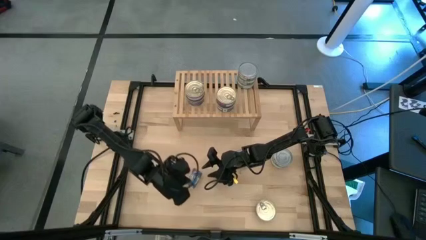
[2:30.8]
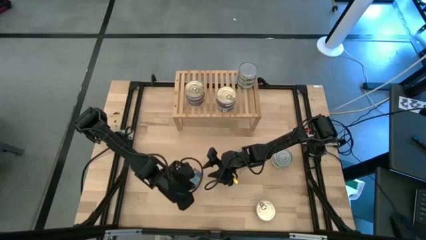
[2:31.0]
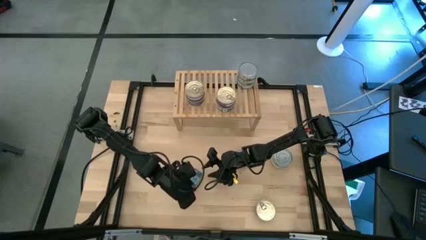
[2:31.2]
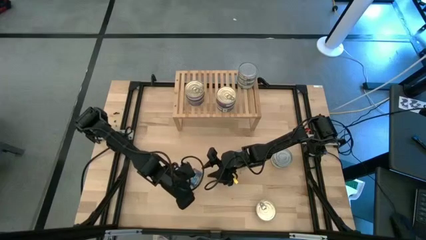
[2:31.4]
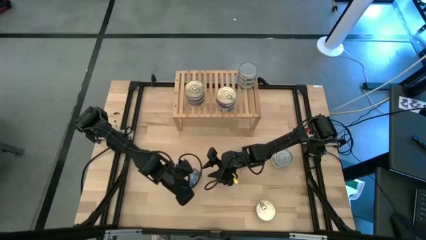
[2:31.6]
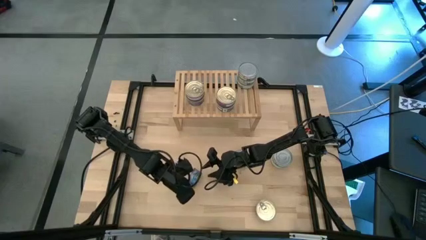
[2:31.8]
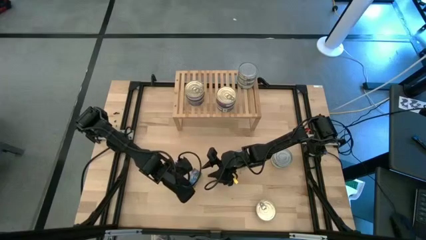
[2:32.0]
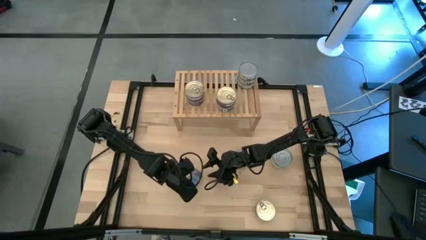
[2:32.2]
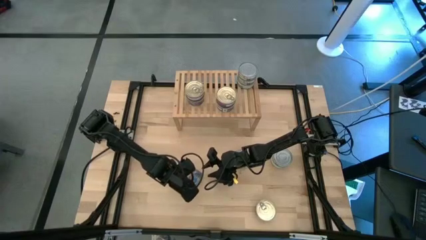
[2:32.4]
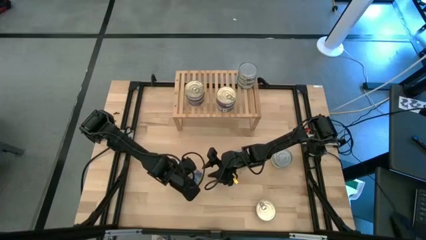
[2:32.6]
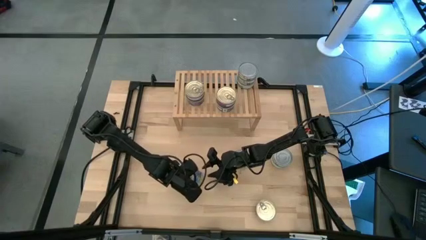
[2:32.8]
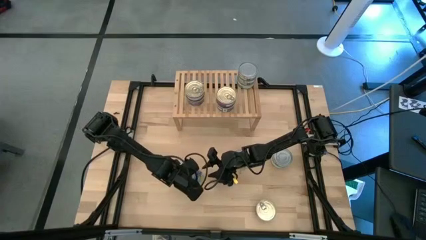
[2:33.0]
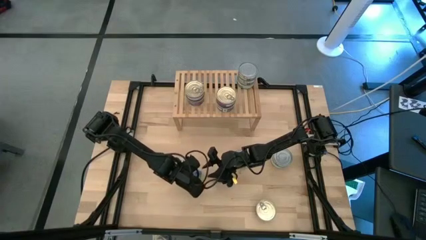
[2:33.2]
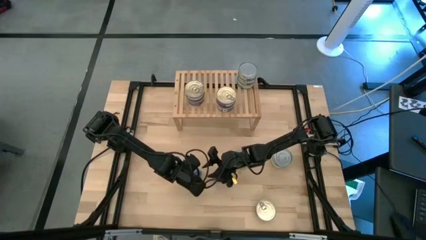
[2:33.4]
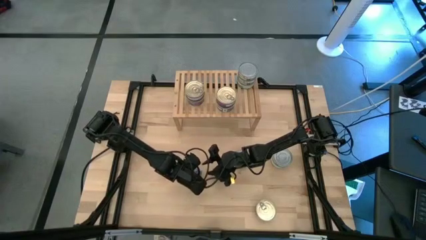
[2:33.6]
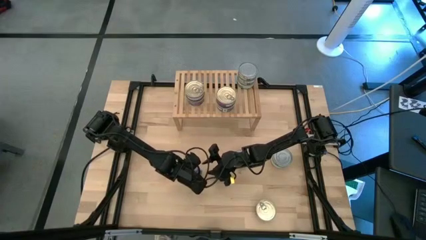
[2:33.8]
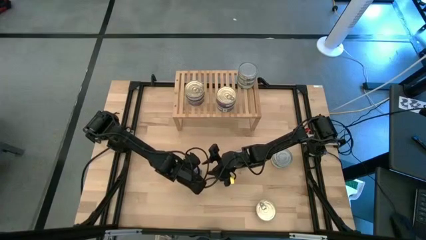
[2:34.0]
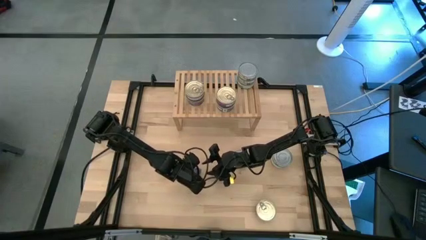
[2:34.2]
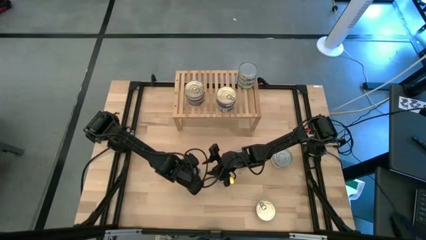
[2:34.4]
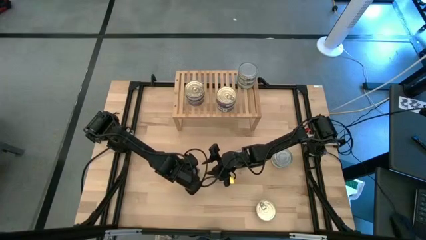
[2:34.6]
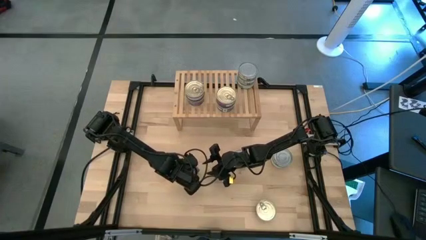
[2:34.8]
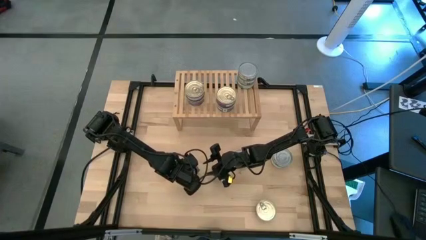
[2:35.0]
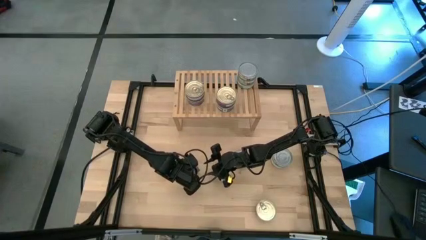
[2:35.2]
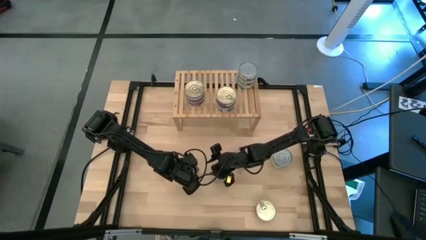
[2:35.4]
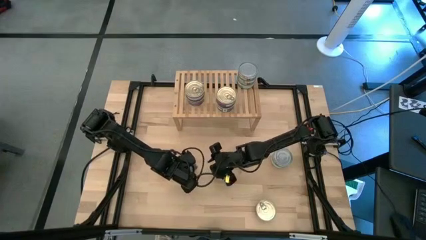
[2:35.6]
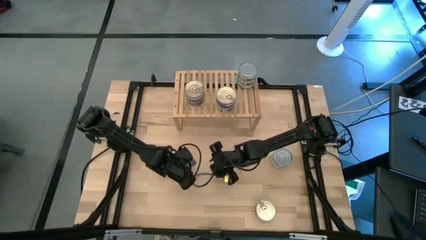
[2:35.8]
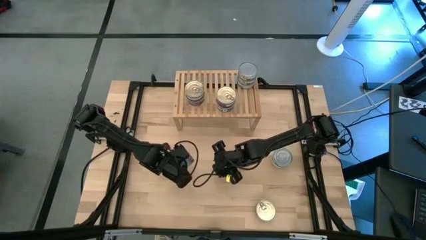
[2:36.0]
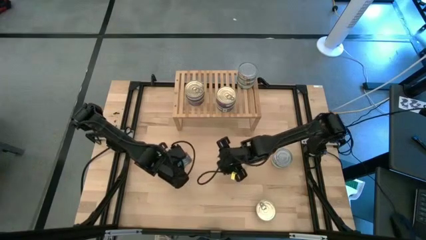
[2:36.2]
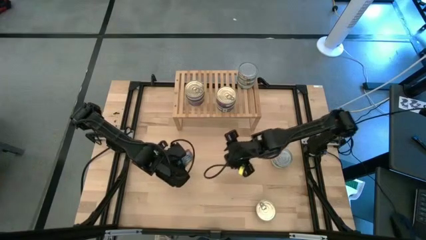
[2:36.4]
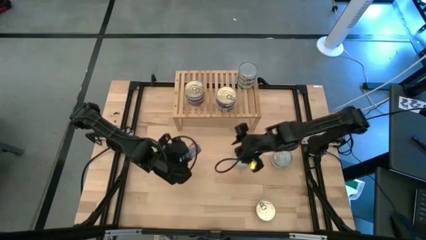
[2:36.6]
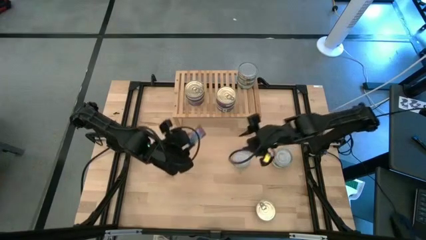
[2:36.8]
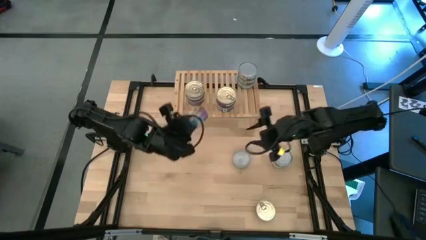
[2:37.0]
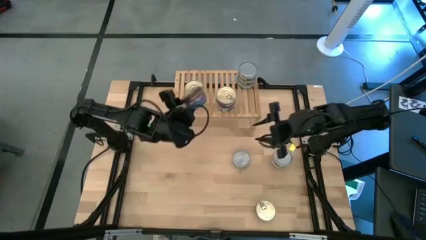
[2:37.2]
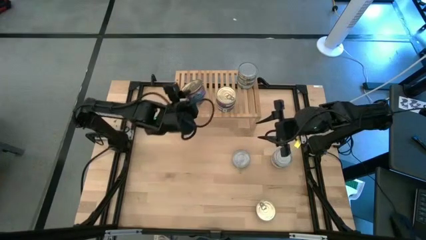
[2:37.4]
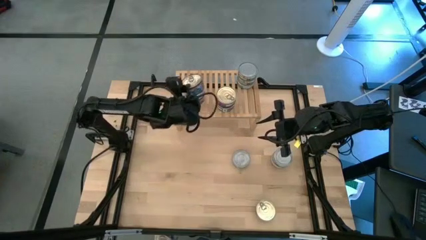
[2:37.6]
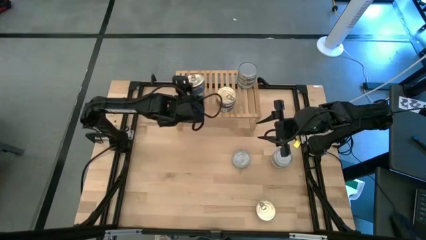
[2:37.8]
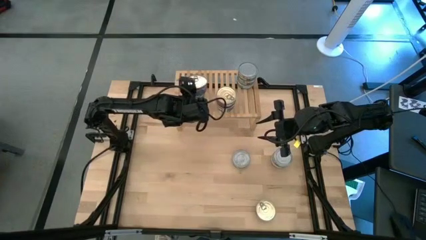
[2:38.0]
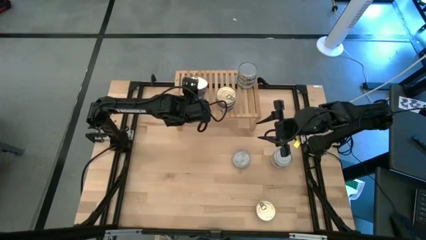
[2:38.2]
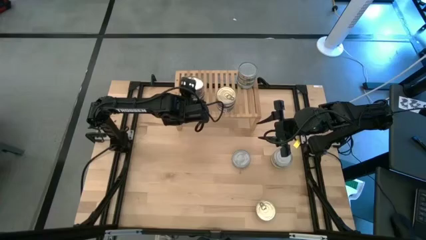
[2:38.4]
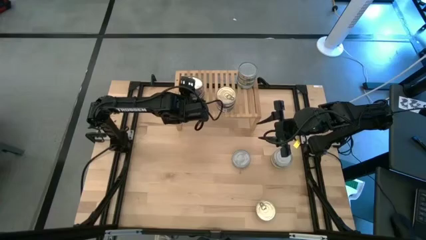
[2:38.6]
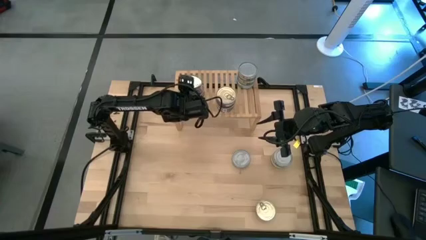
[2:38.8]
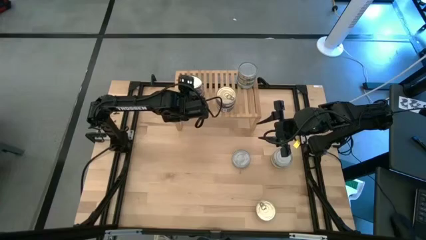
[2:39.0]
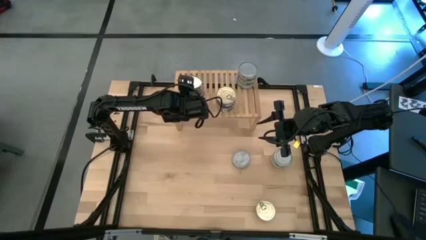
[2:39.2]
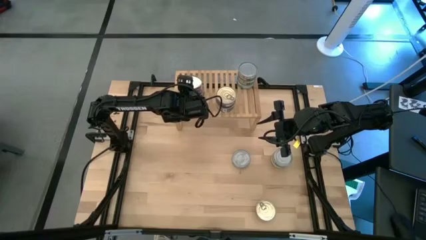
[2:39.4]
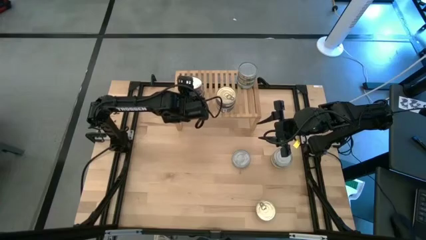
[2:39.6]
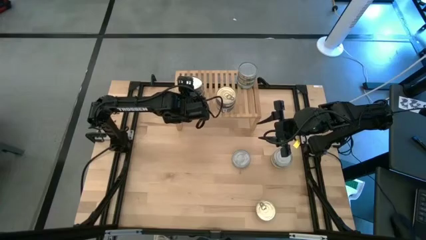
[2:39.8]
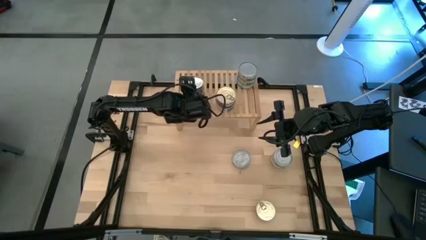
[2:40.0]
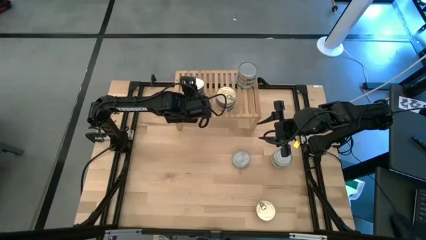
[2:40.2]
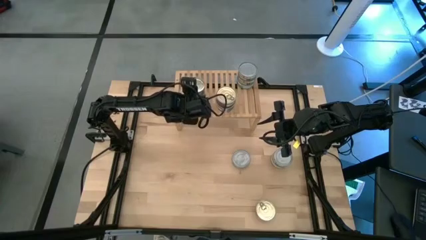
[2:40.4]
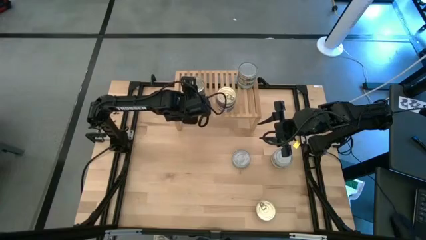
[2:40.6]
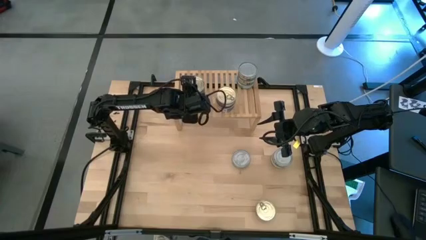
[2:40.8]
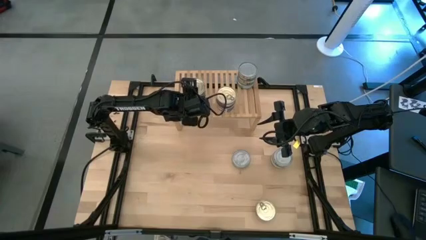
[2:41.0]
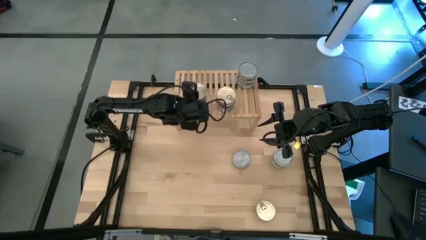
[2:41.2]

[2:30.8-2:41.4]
Task: Stack canned seafood by type on shelf
Stack the blue tuna can on top of the blue tuna can on the shelf
